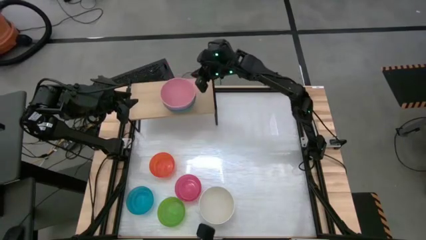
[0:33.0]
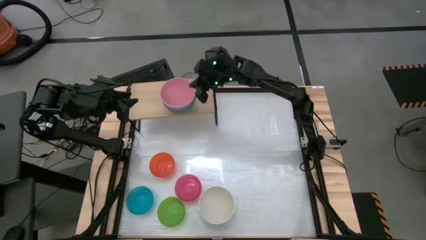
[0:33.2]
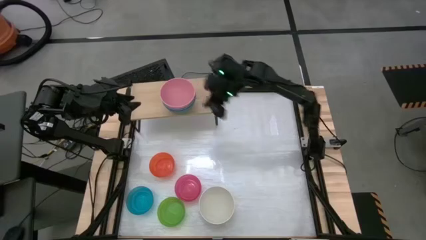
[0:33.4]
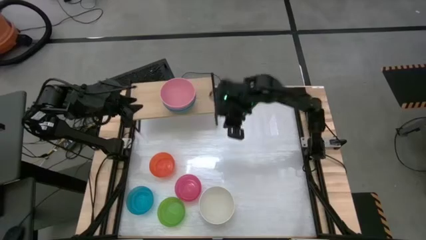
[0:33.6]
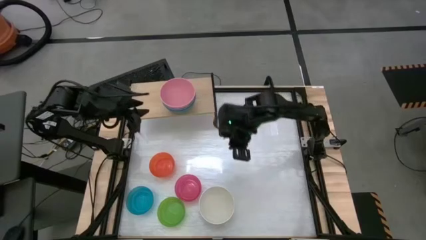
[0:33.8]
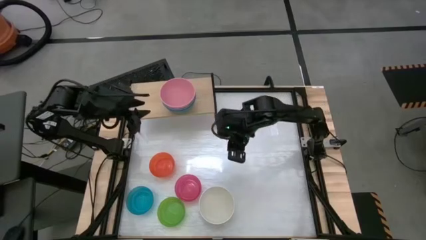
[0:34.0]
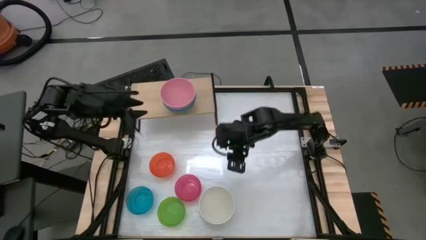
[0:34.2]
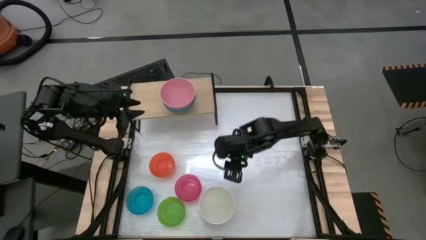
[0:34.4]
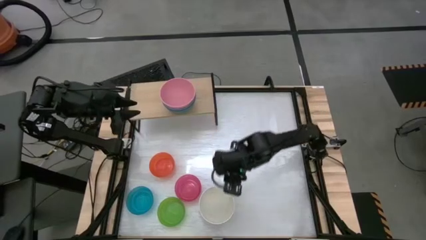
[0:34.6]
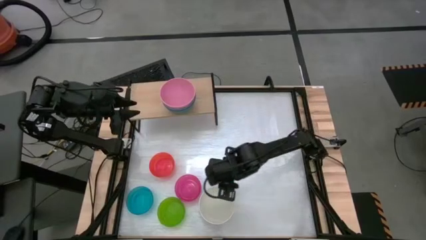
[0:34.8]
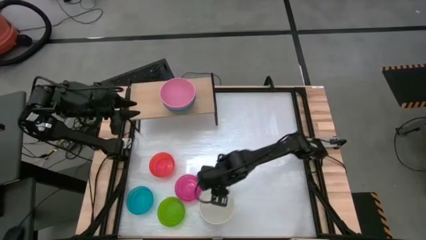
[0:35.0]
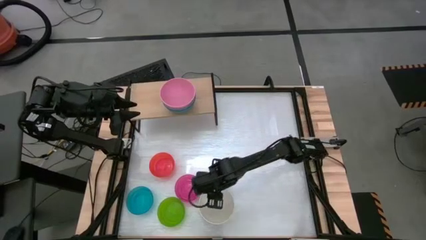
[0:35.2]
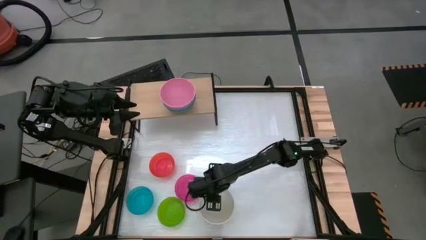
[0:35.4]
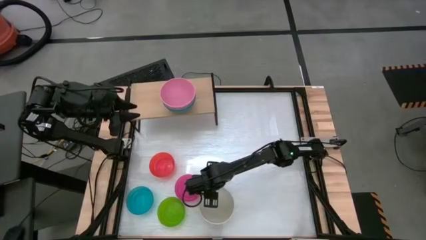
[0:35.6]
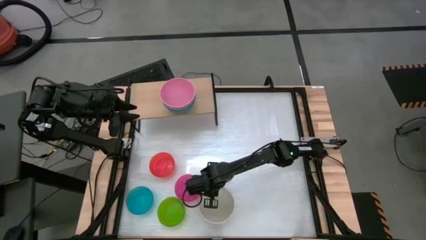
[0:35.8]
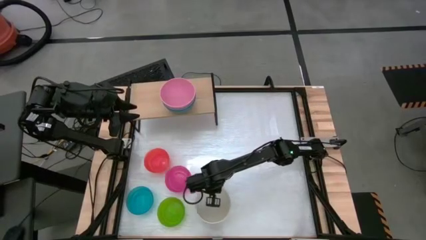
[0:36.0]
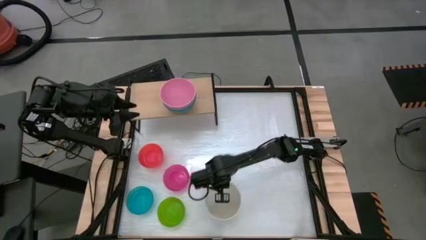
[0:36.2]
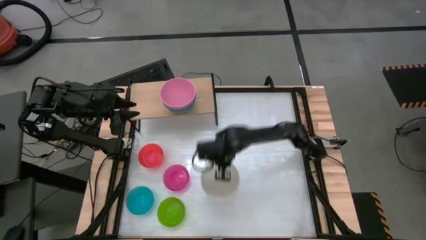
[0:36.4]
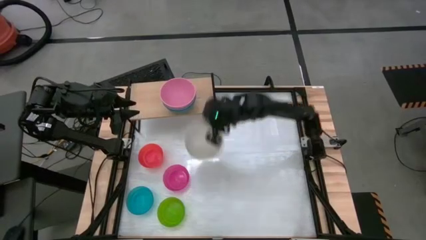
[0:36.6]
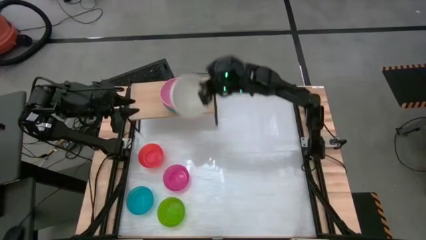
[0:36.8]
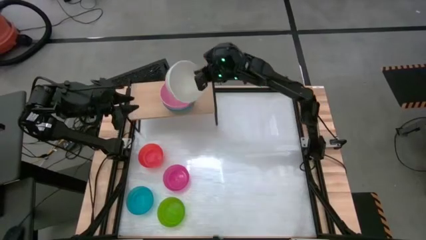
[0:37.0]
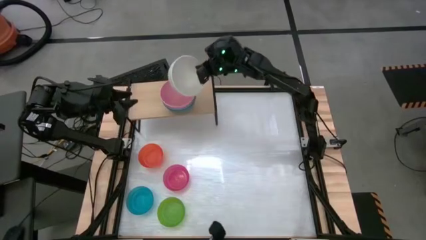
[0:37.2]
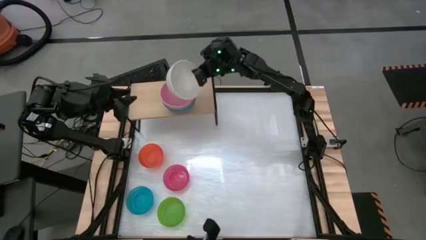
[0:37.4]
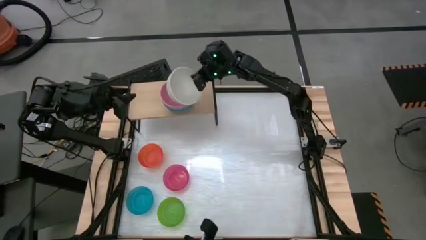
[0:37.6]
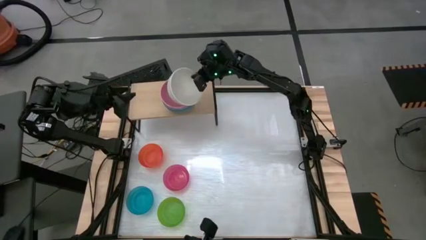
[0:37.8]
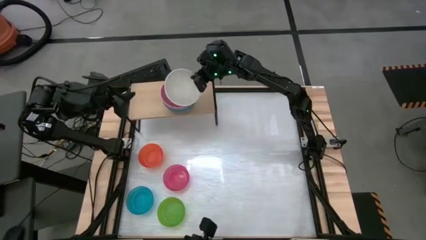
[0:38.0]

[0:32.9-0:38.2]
Task: Place and stack bowls onto a shelf
Stack the large white bowl on top of the large pink bowl on the shelf

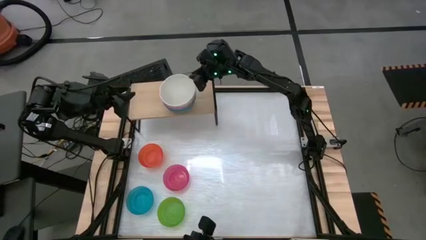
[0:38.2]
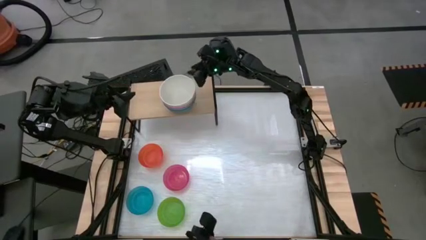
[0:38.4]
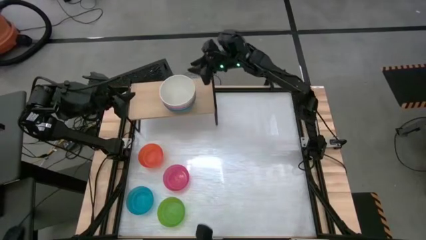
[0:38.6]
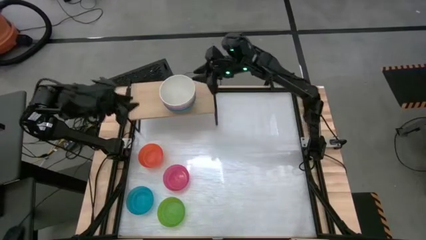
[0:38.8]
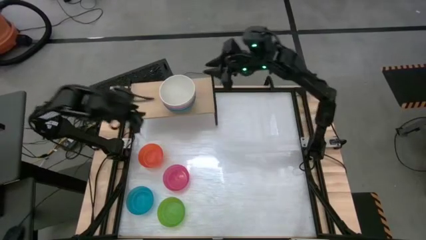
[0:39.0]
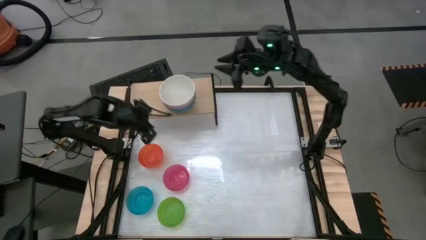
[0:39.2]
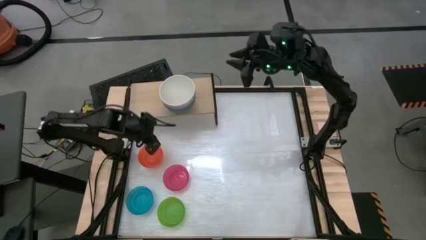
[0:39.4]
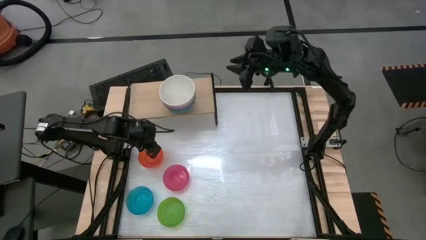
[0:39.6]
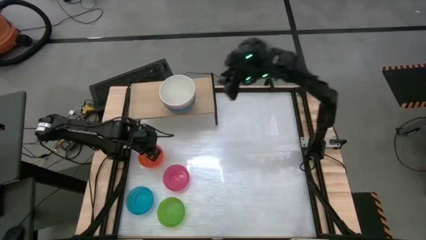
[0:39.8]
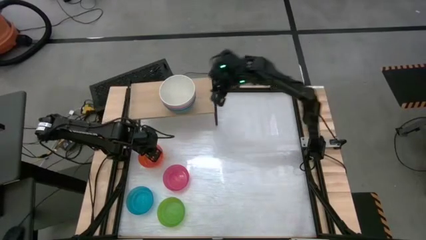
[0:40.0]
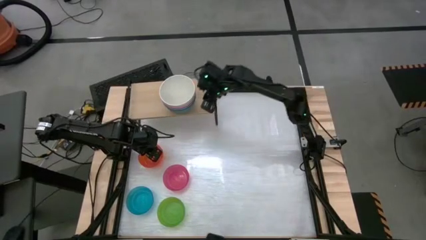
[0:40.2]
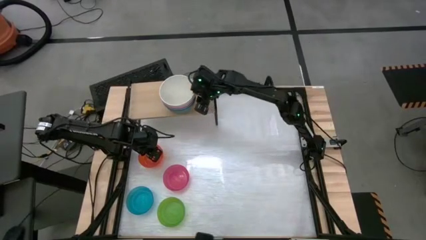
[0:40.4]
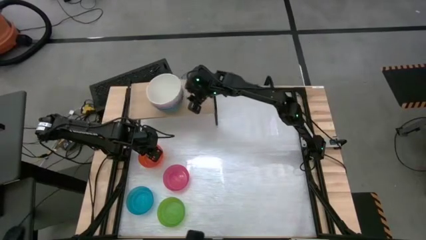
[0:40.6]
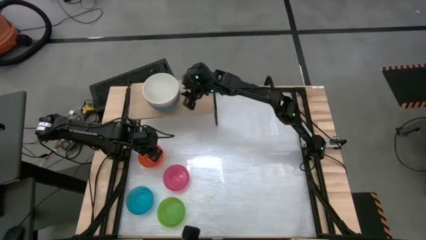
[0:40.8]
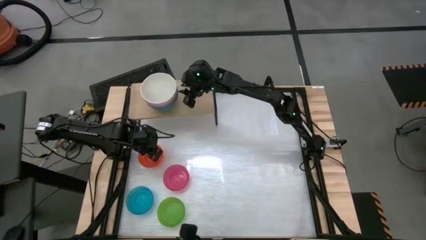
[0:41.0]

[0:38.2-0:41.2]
Adjust the stacked large bowls on the shelf

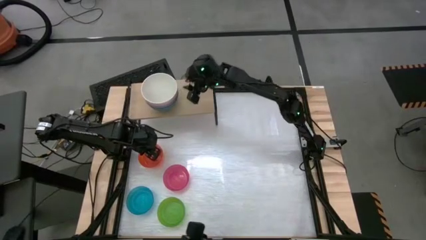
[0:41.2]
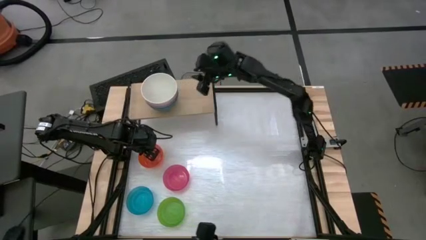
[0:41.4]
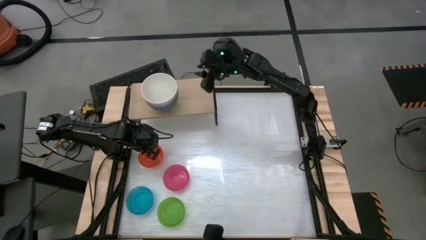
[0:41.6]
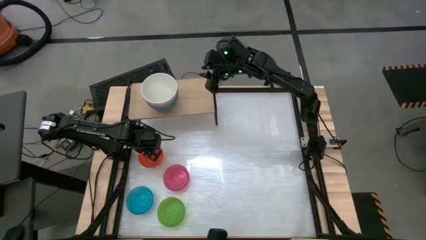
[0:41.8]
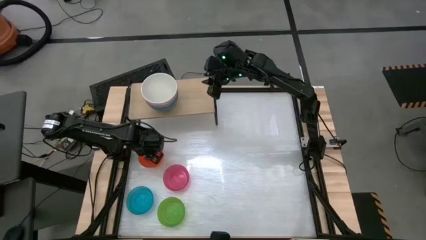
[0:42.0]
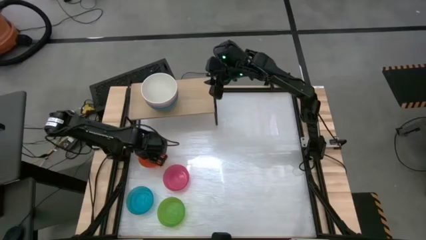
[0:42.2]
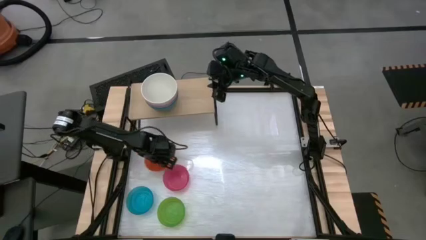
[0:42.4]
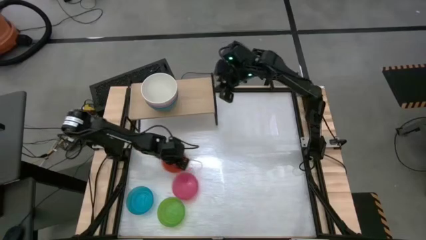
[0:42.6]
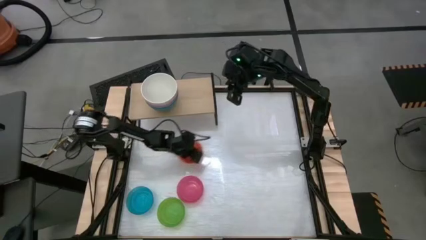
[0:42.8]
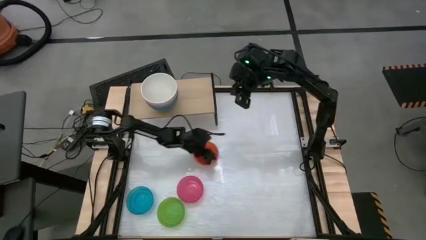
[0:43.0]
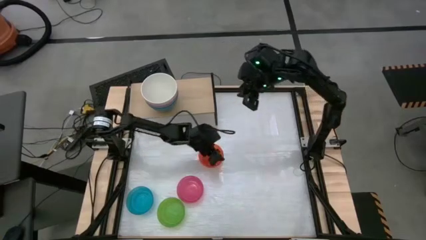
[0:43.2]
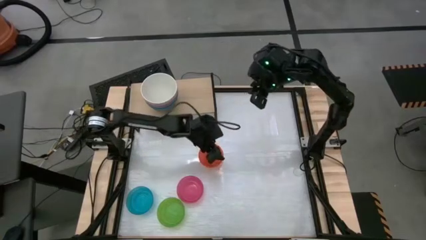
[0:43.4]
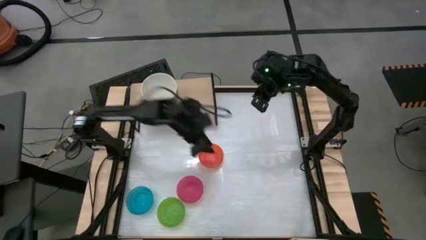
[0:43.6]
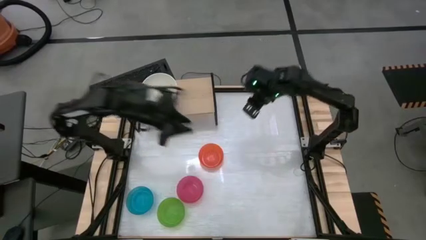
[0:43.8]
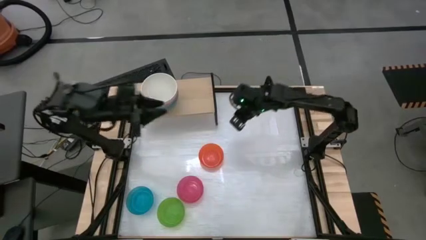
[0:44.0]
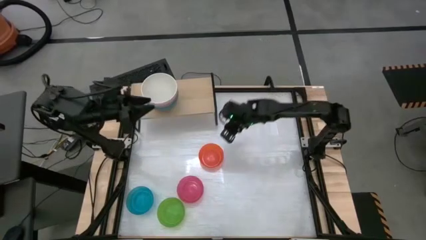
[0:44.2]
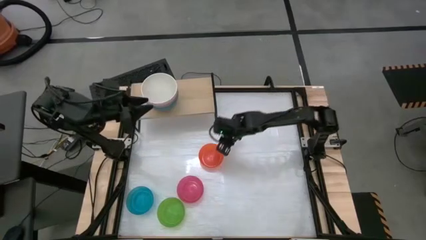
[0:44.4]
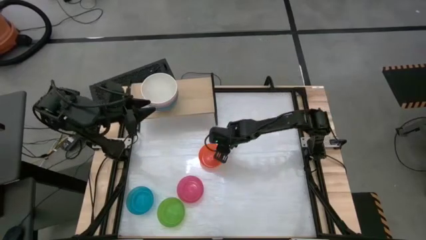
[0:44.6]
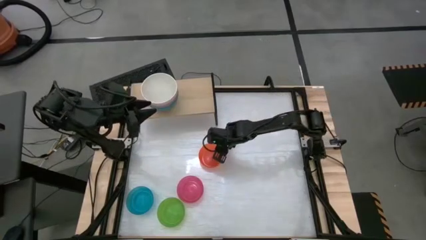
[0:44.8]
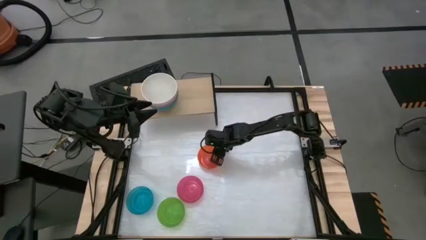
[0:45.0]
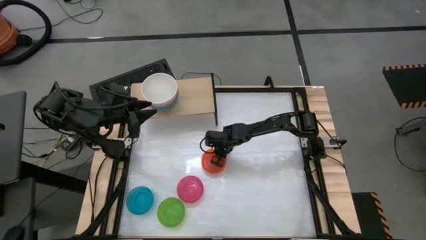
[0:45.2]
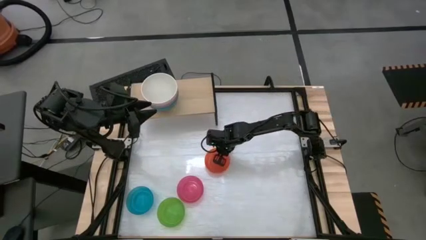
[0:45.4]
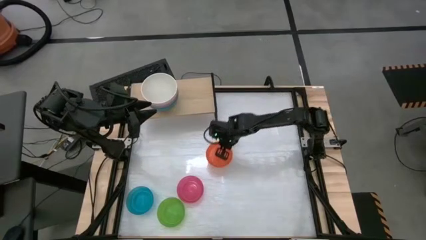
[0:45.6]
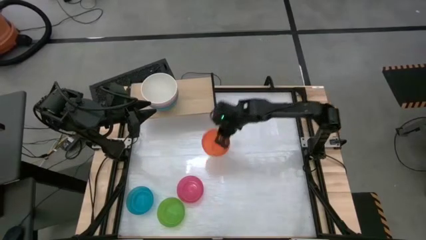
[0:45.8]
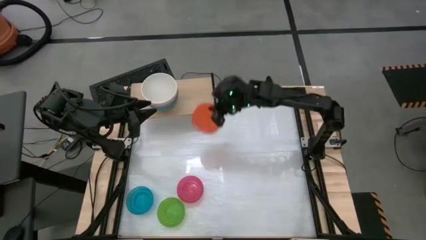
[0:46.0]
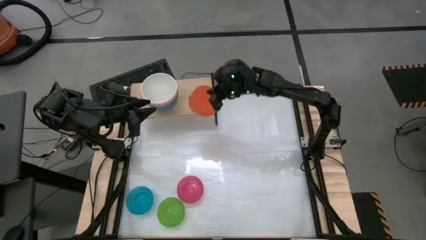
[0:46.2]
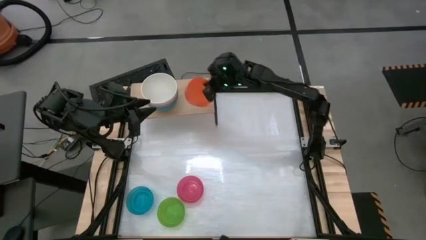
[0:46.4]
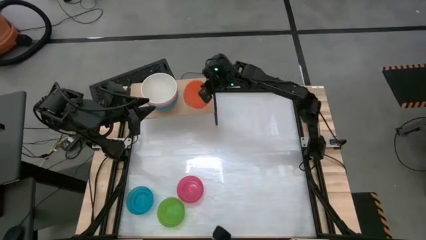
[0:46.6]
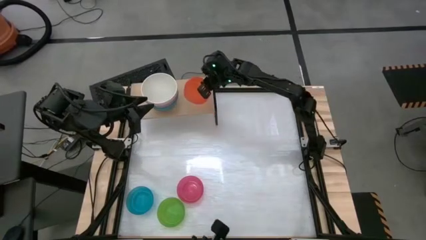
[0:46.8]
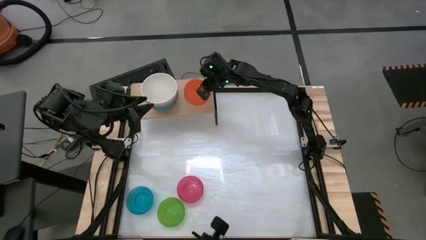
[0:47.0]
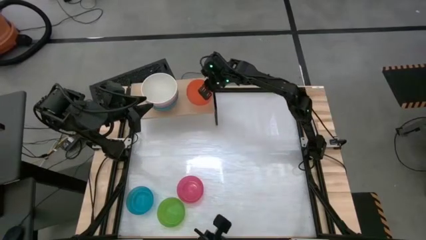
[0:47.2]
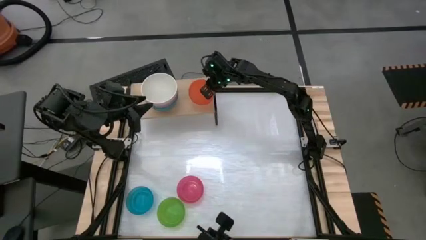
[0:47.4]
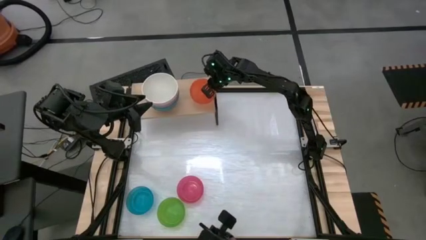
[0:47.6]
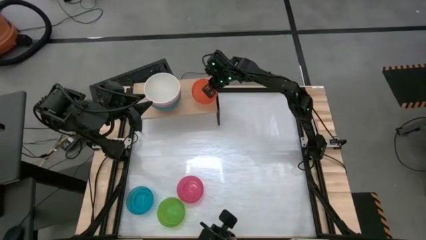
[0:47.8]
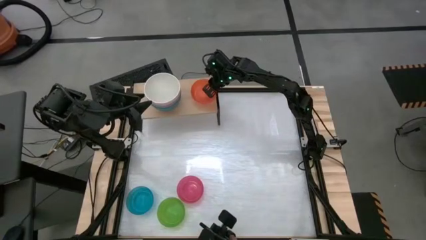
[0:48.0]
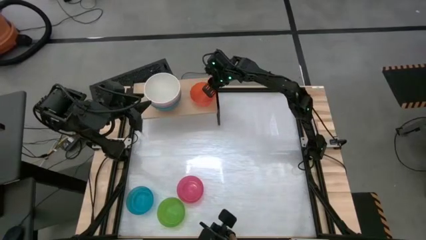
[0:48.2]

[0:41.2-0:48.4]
Put the small orange bowl on the shelf
